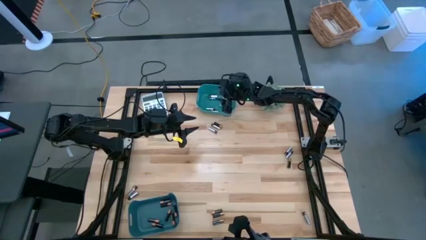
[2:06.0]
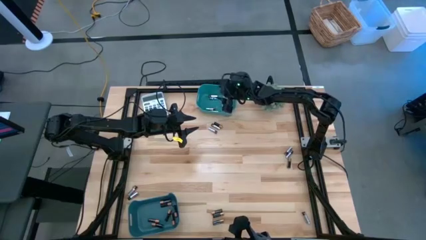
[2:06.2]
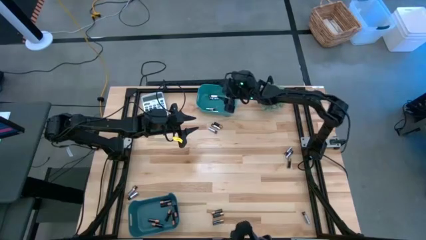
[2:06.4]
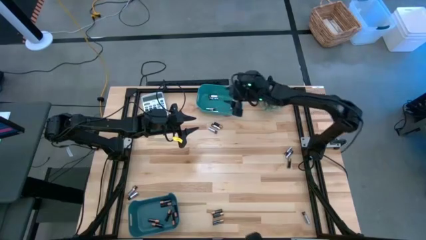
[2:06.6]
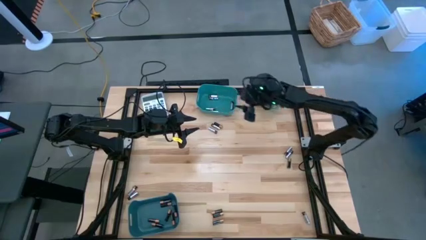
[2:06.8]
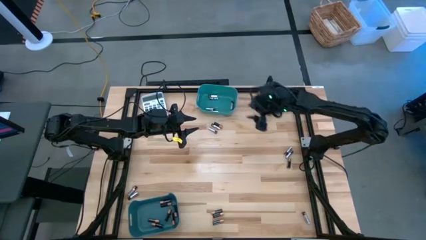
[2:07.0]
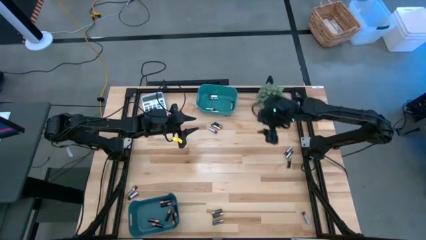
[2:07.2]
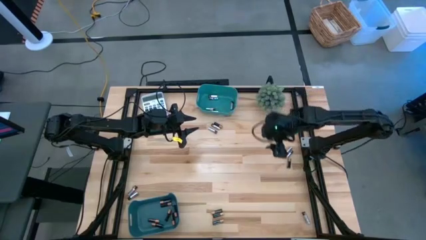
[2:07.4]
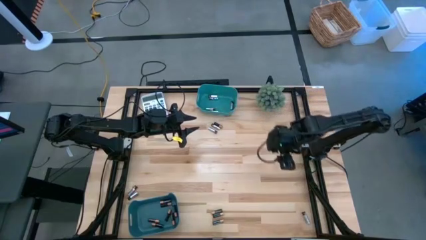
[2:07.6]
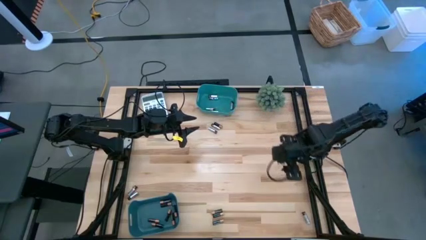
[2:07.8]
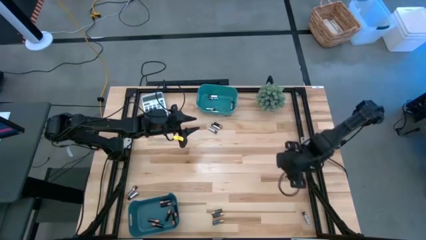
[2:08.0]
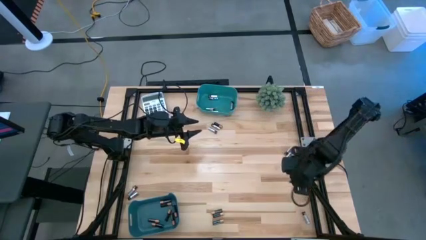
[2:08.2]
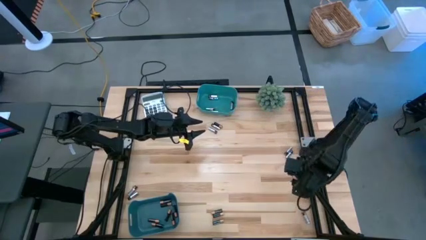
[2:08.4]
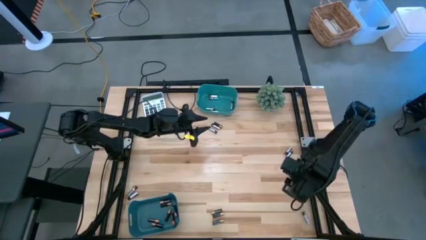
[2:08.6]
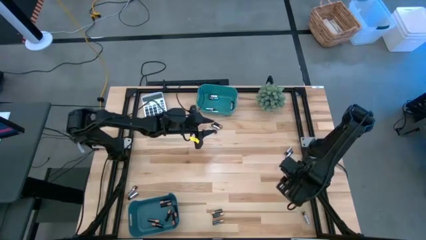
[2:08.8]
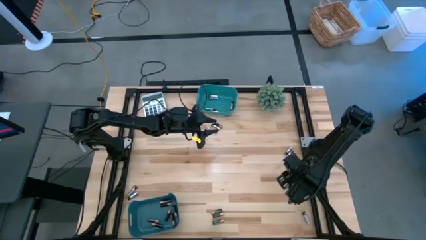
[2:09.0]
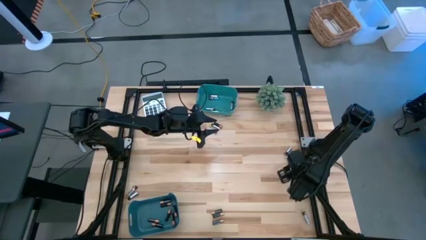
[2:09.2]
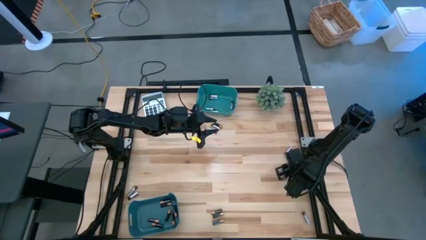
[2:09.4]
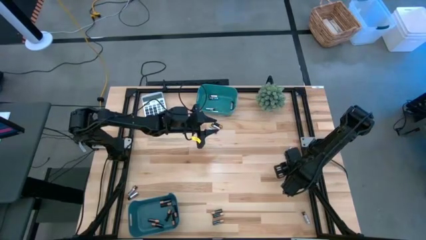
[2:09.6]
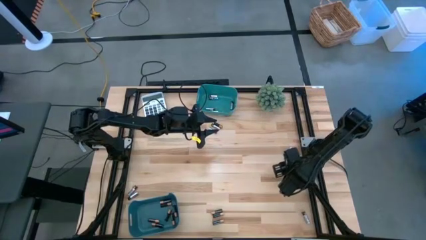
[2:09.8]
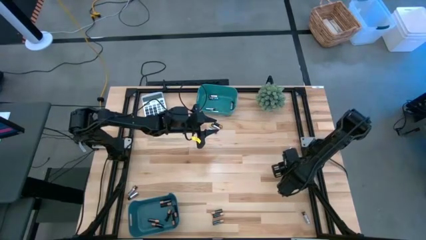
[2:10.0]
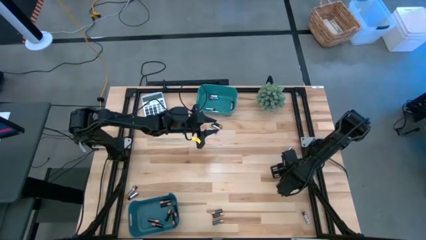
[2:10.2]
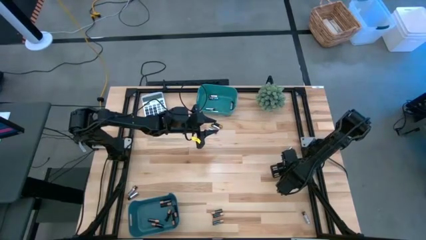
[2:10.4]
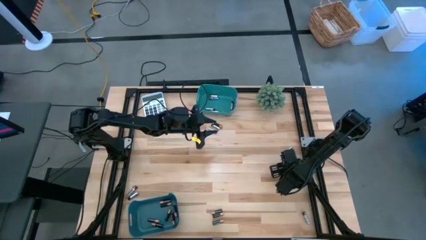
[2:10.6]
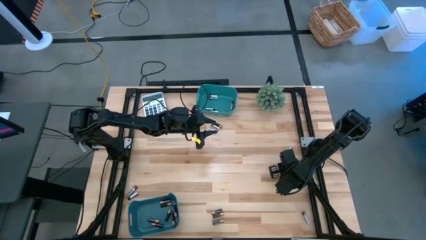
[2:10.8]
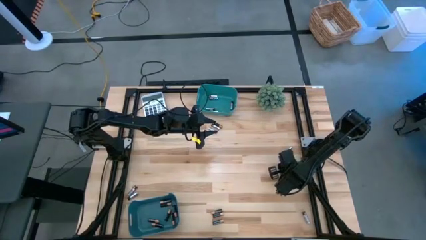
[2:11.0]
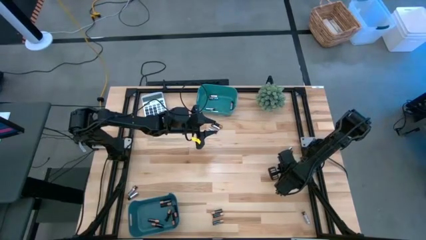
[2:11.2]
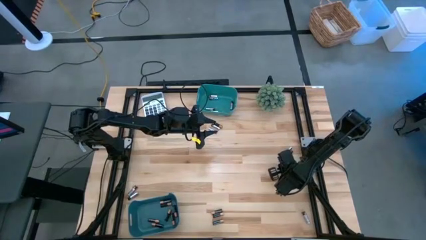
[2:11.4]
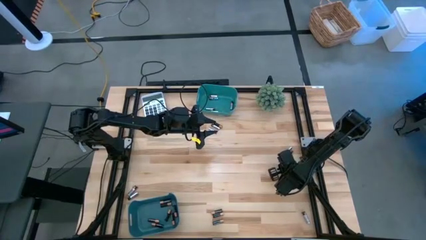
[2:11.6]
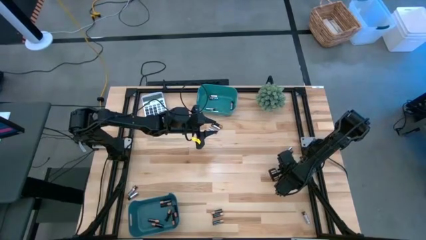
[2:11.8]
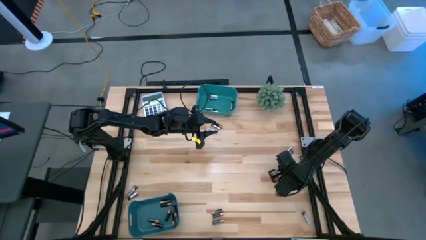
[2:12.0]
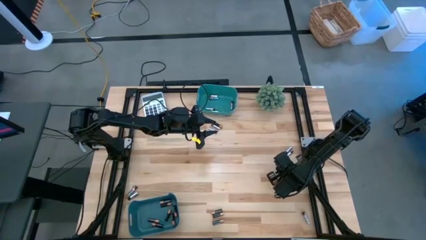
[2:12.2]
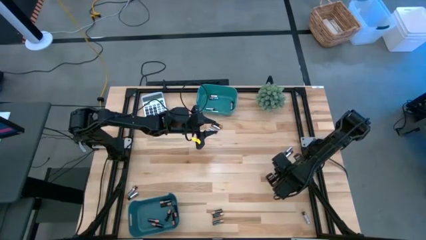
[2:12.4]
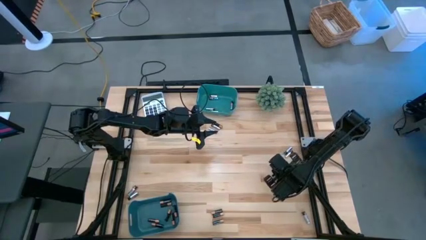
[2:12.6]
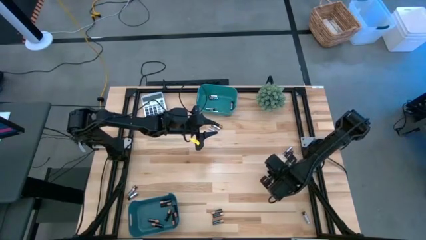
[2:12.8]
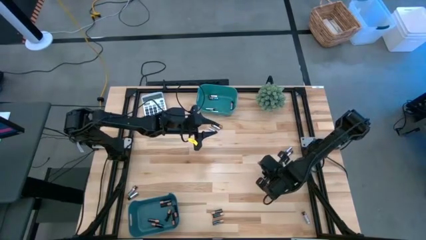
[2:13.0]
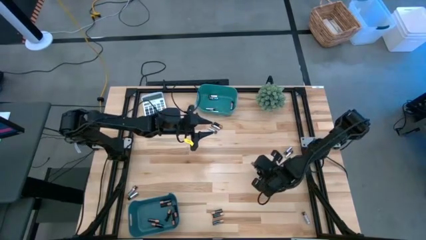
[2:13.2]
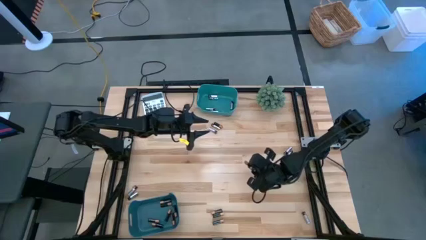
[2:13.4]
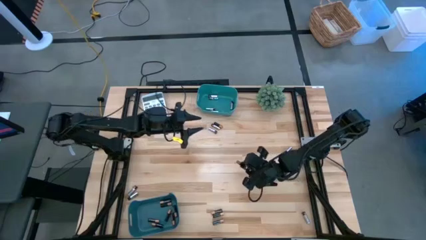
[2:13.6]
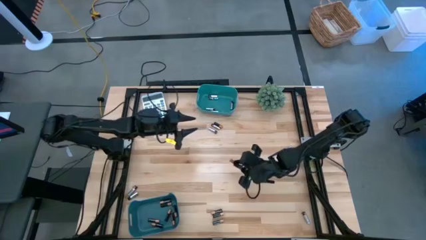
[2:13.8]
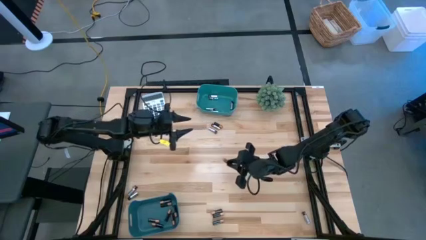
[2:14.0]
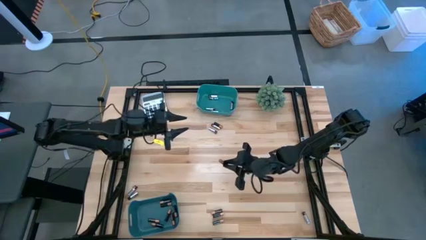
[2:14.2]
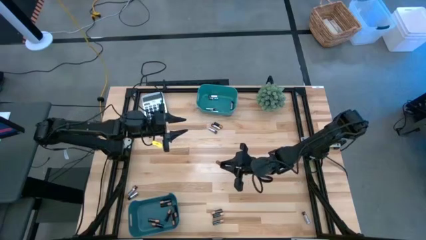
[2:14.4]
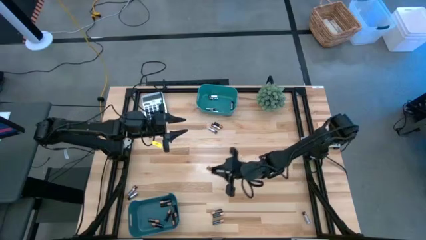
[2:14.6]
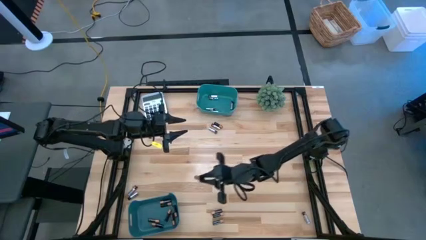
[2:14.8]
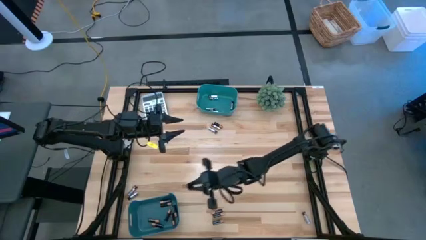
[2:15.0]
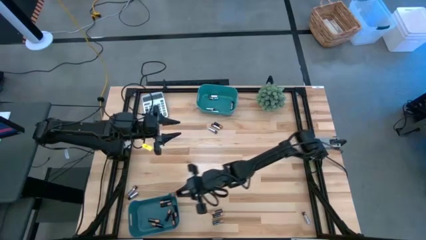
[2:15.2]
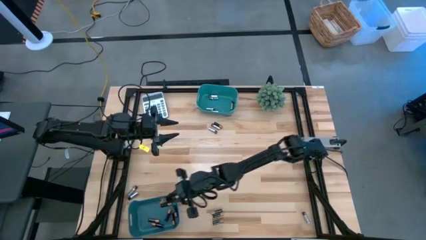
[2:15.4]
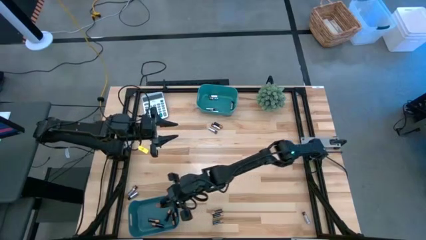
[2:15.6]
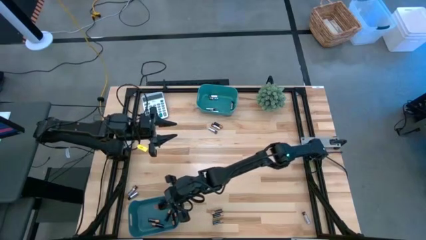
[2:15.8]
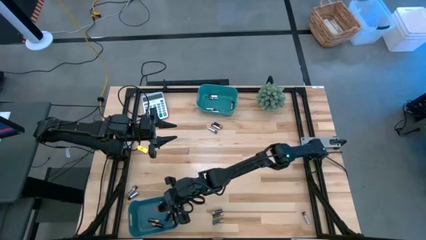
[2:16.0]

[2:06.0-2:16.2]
Task: Sort batteries
Put the gold battery into the bottom green bin

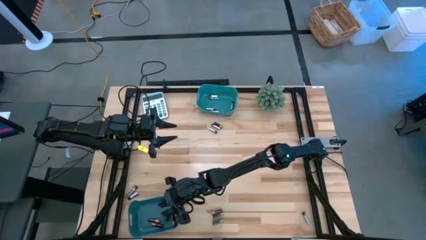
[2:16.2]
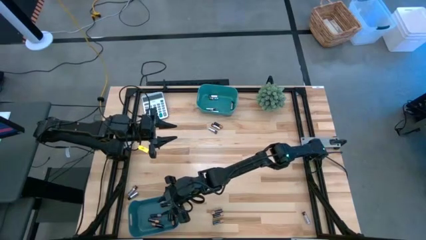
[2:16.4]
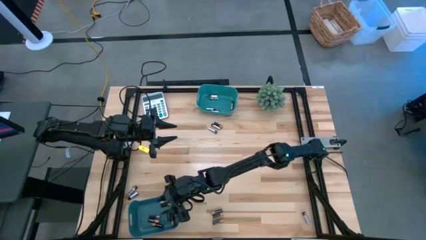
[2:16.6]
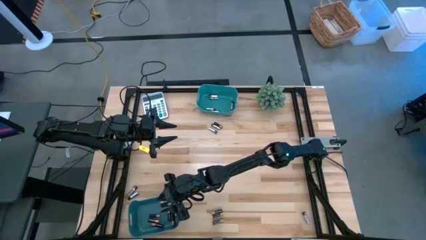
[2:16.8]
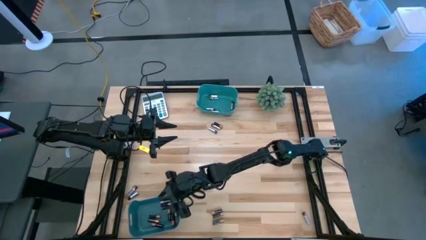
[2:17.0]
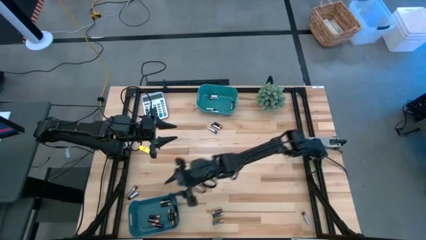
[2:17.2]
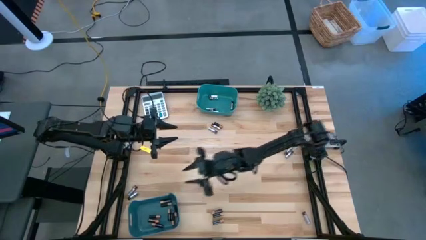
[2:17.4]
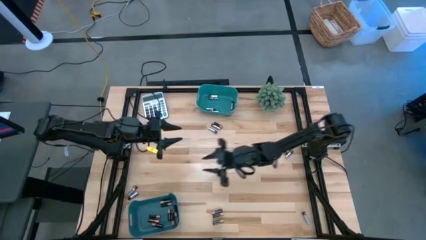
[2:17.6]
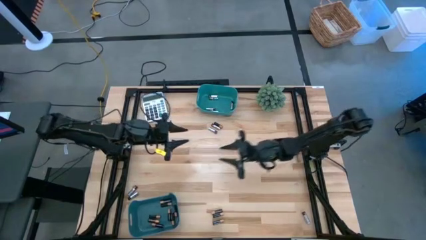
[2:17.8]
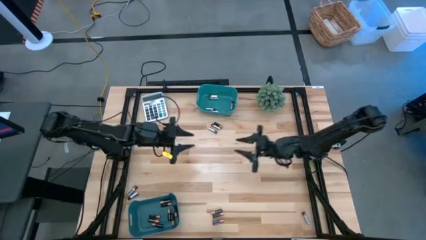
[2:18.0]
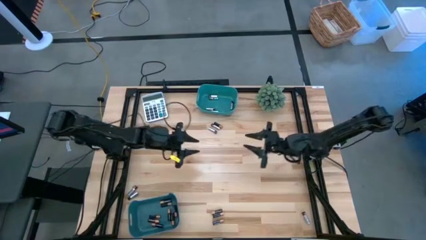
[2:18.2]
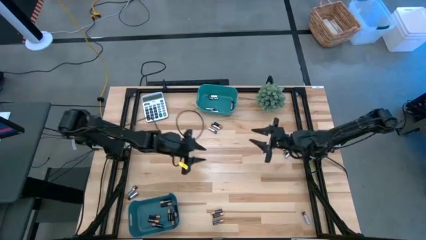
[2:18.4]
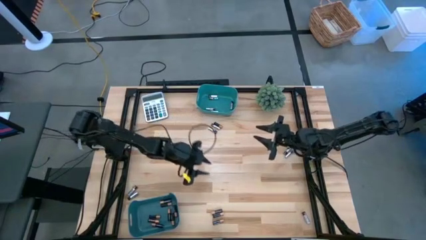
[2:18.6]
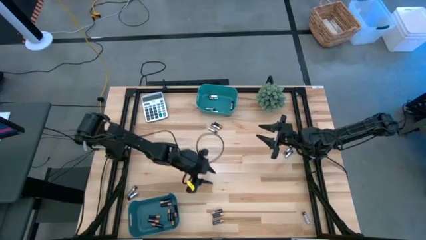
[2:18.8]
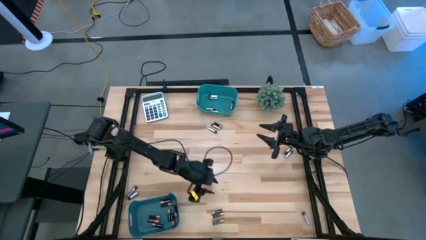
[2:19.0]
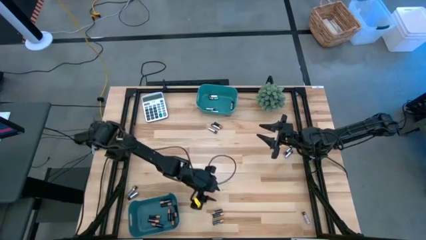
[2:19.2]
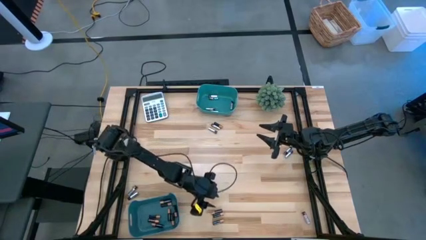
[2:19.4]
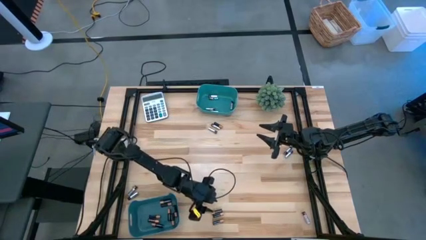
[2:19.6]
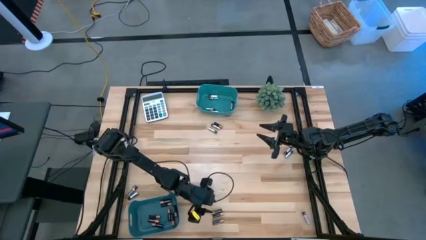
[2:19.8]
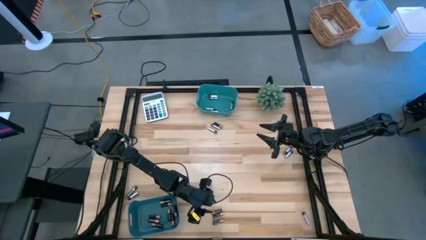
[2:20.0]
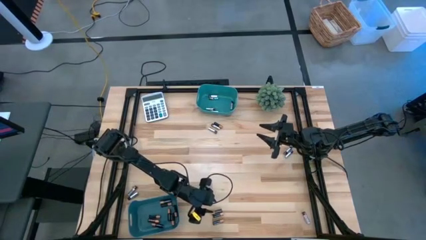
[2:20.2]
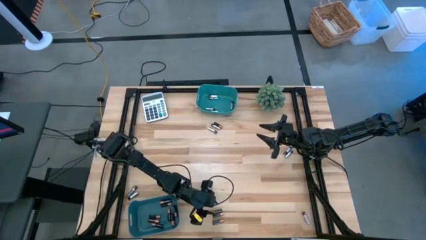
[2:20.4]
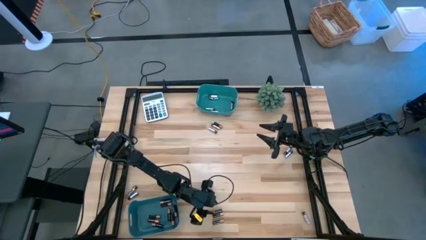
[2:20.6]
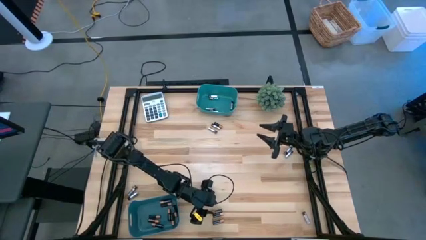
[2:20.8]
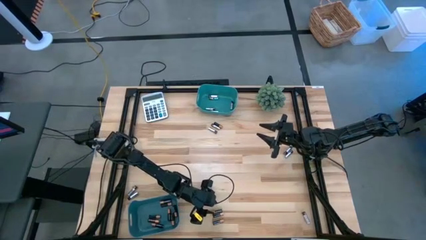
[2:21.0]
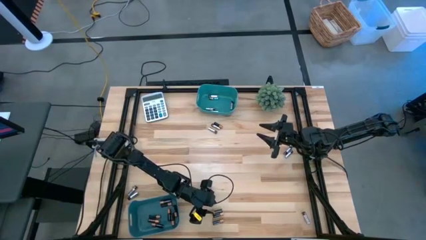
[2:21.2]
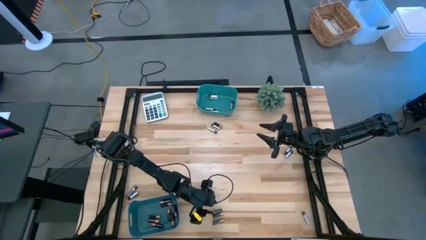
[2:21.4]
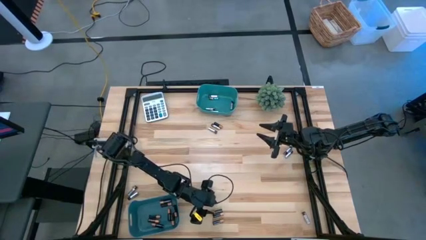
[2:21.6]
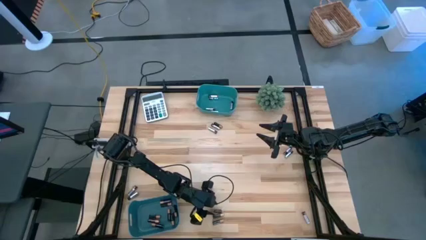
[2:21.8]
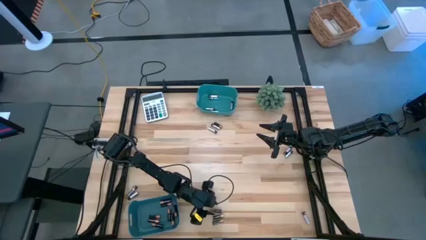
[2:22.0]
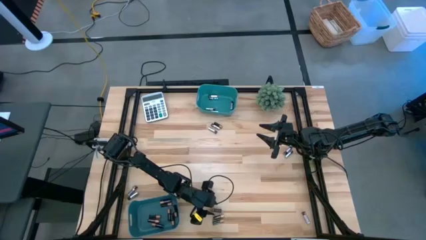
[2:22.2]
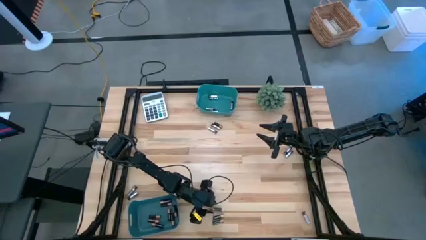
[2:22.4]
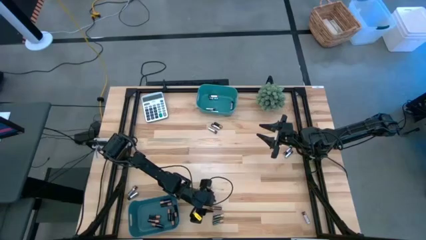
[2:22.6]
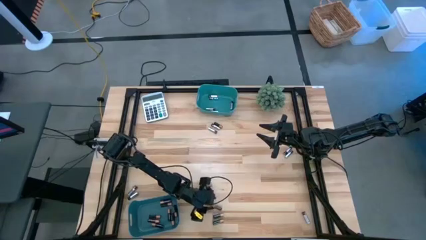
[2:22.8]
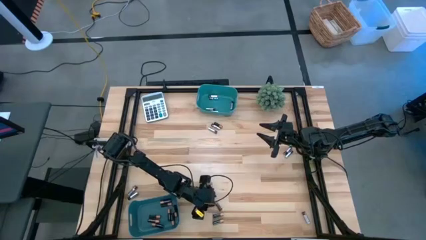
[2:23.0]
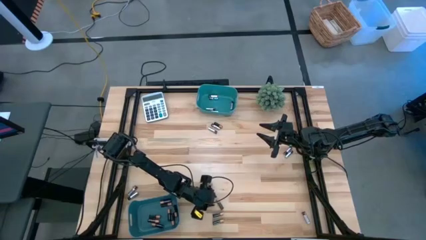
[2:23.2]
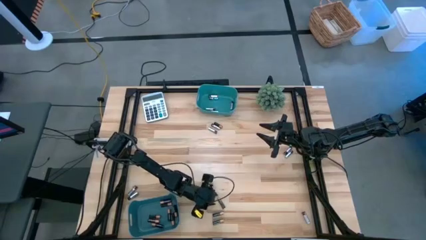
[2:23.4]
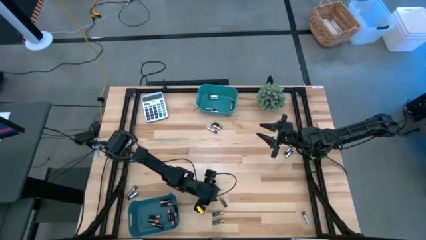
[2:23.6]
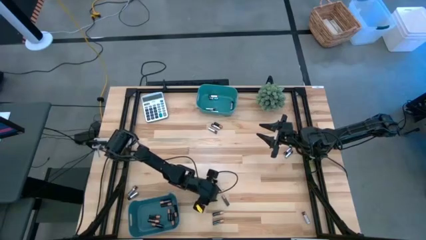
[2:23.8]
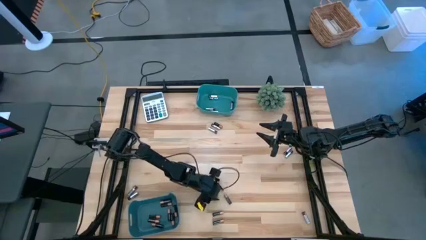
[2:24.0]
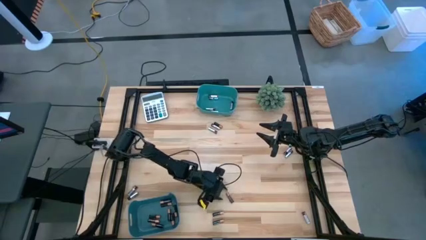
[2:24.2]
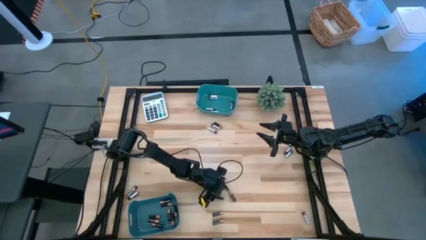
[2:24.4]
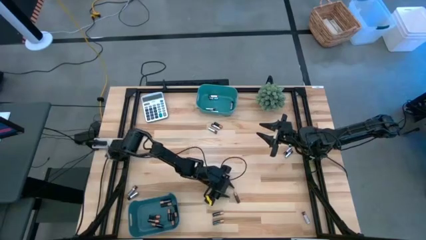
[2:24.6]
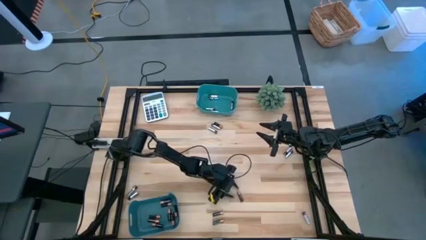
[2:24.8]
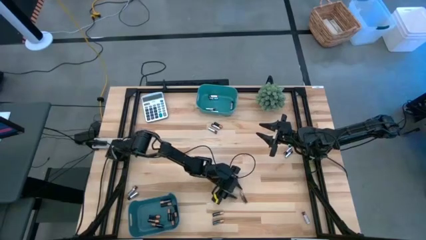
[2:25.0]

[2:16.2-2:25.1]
Put the gold battery into the bottom green bin
